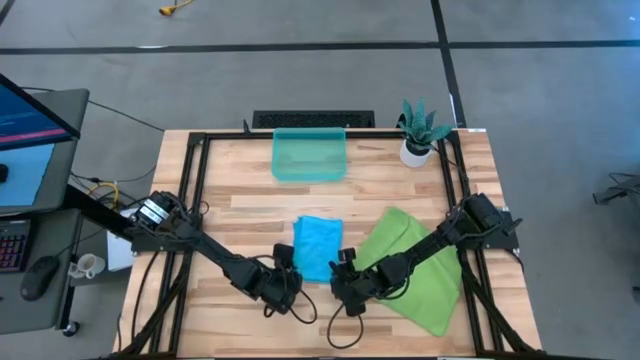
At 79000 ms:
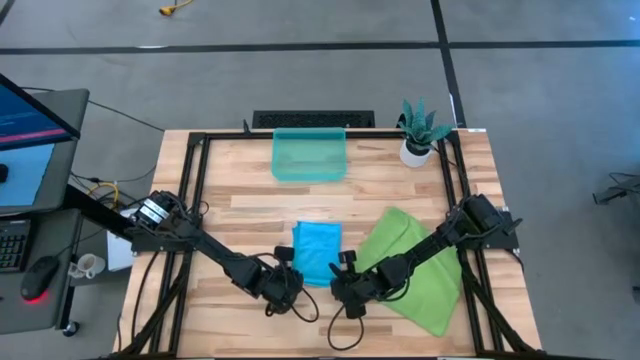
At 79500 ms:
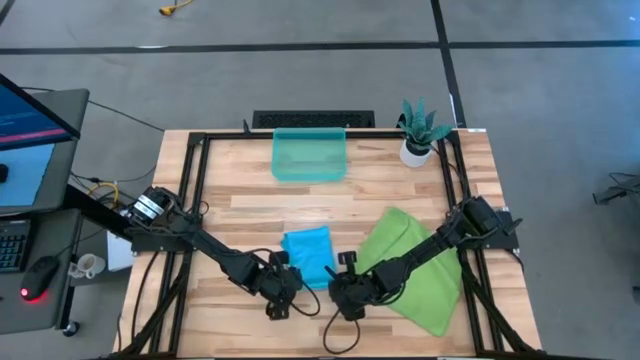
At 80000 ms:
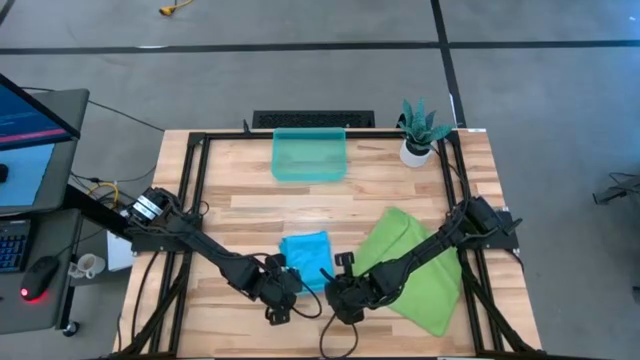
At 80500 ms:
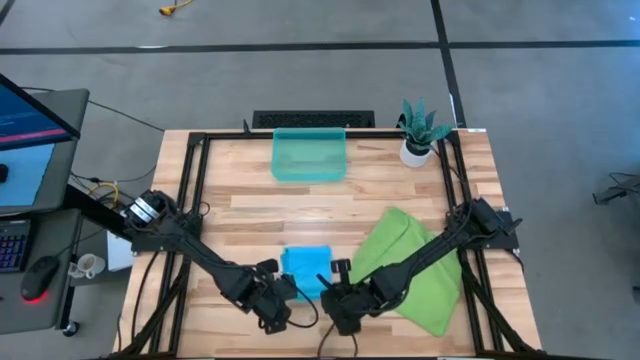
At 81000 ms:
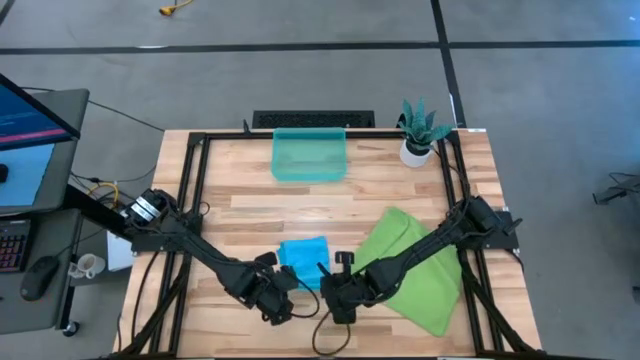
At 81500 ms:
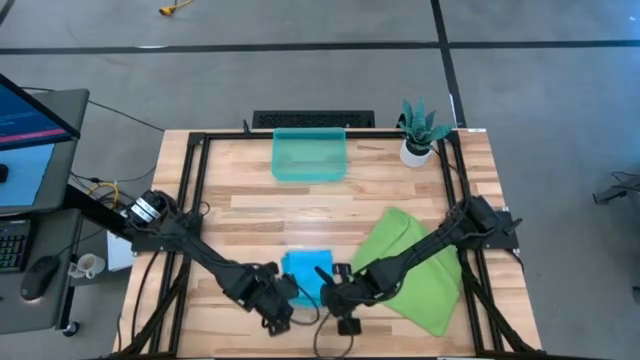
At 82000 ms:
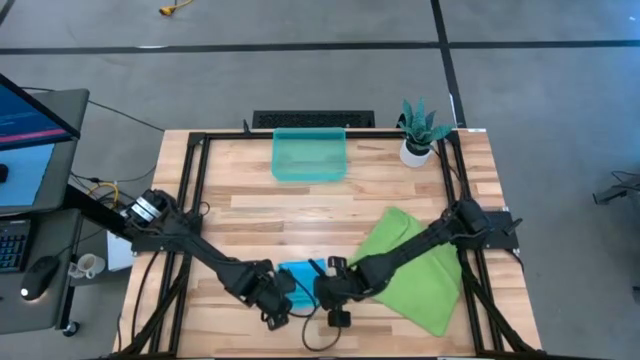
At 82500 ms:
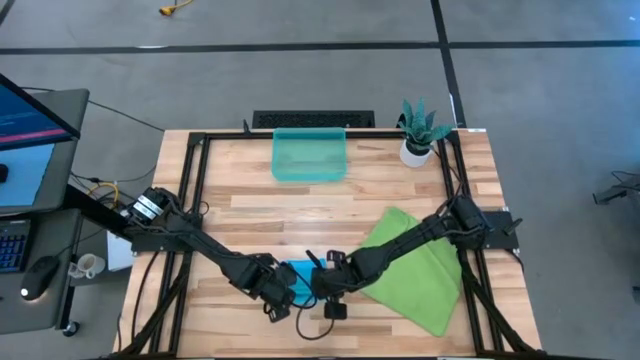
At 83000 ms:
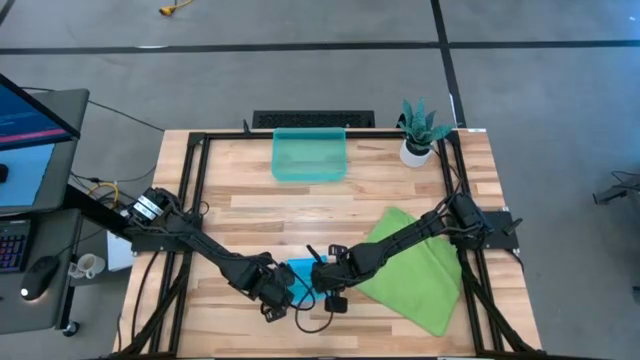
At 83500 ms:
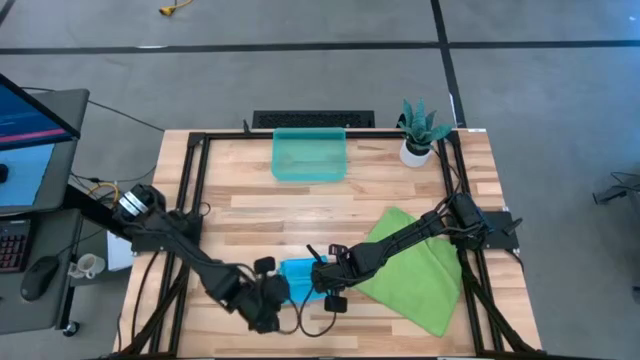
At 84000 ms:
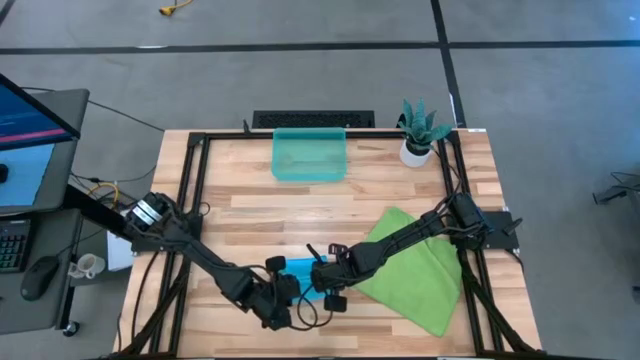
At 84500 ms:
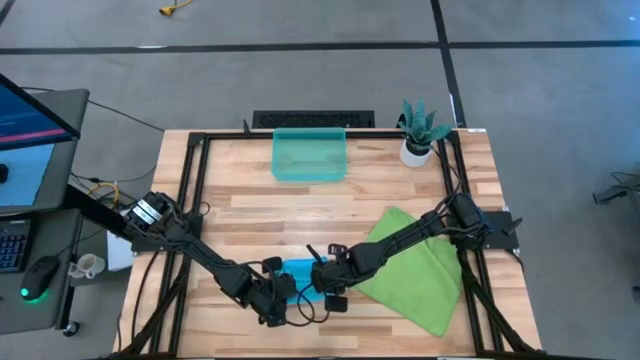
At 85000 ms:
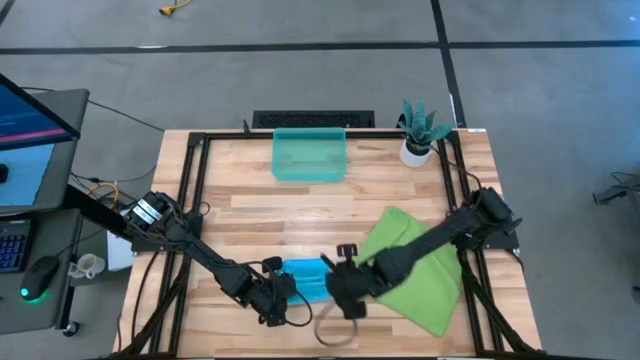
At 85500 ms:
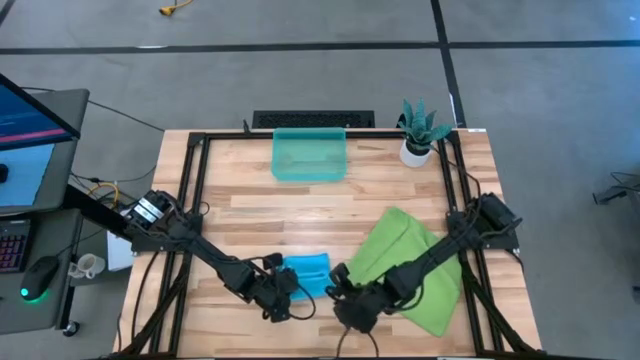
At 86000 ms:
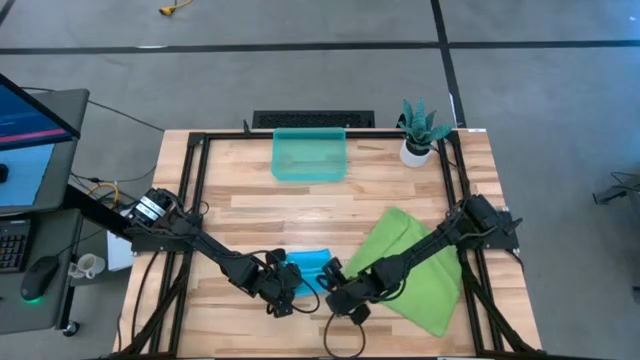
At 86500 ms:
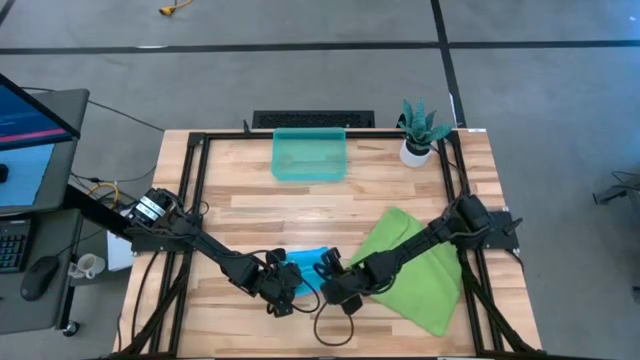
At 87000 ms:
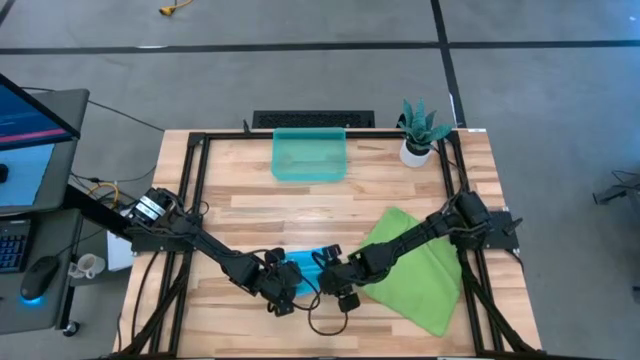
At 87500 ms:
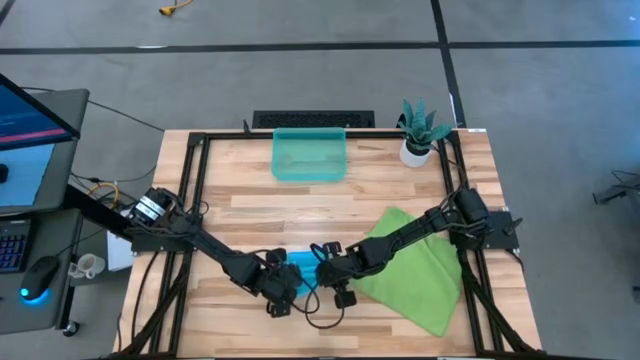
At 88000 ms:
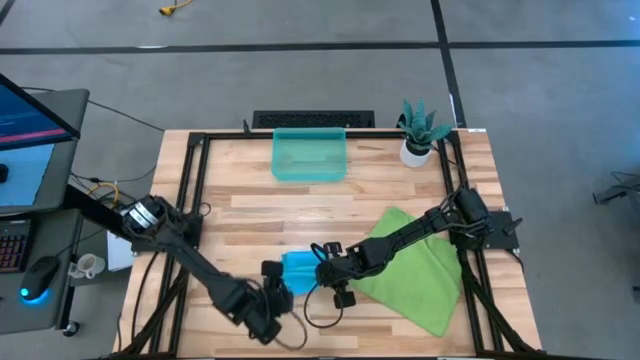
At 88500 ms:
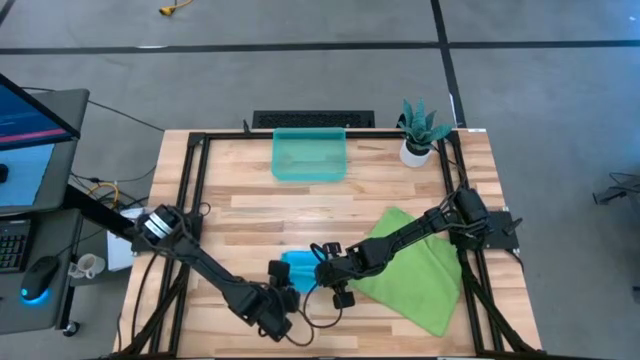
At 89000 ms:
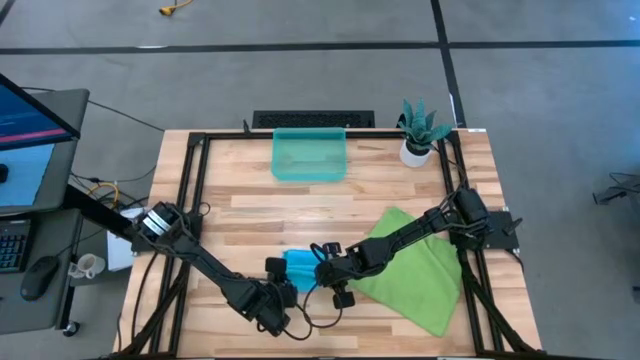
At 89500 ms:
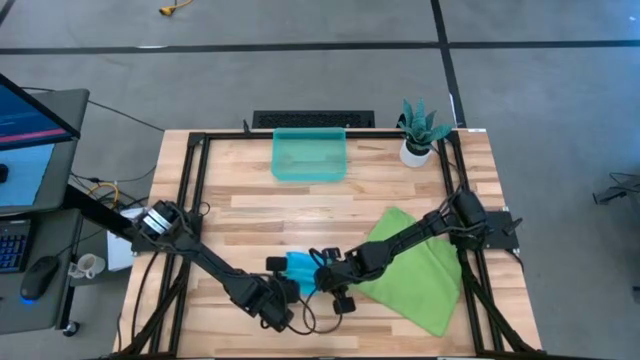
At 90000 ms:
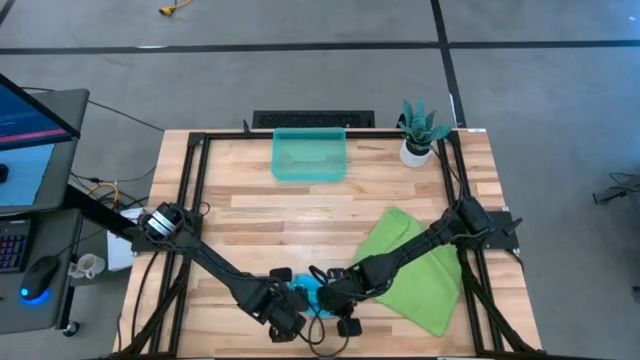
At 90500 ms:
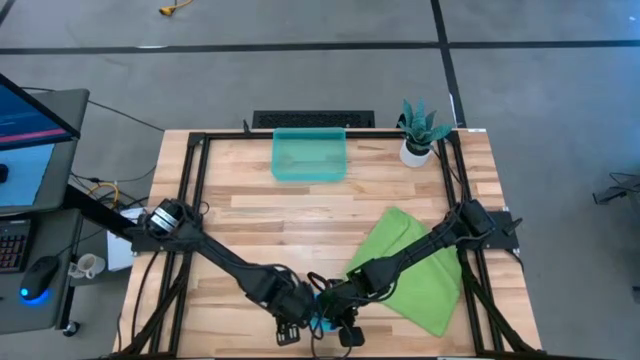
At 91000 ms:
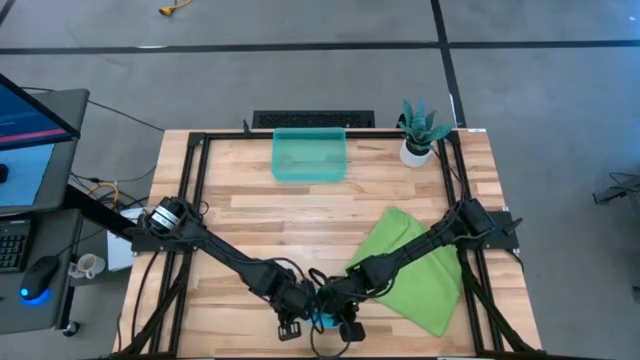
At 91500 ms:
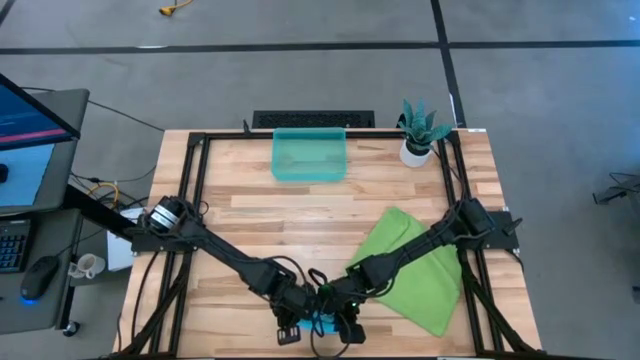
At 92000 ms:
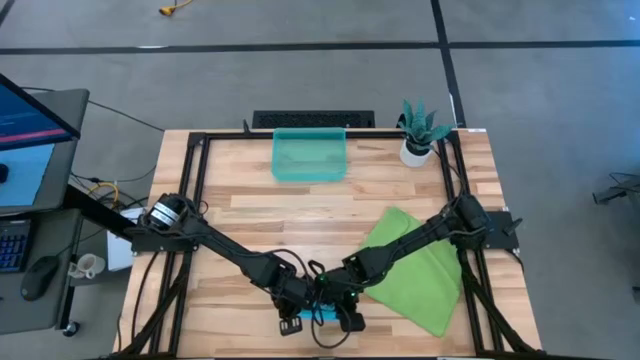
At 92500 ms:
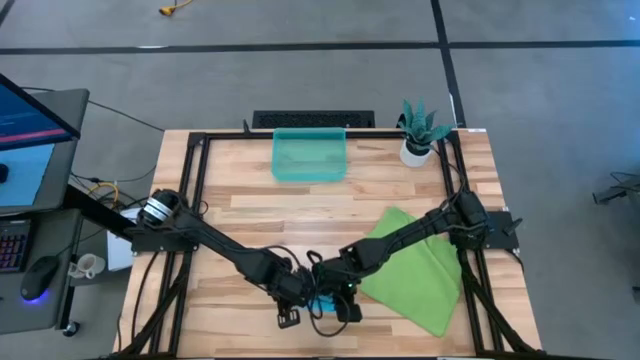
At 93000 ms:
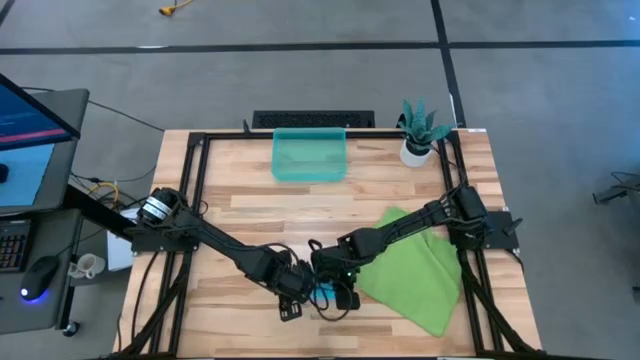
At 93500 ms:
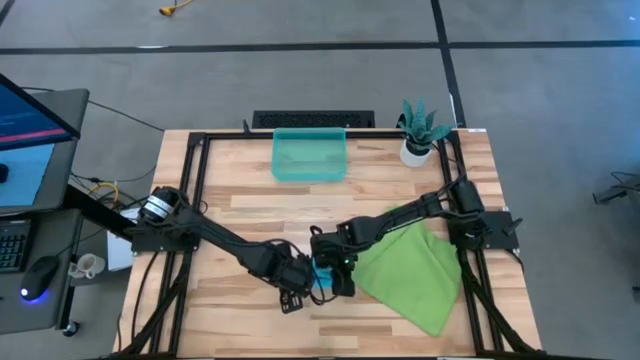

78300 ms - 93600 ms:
Task: Roll microfiber towels into tight, uniform cylinder then place into a basket
Roll the blue microfiber cloth

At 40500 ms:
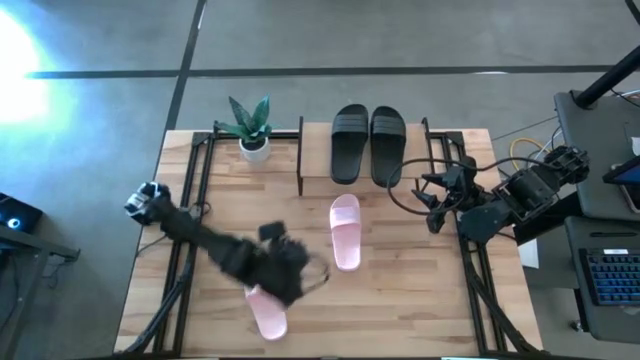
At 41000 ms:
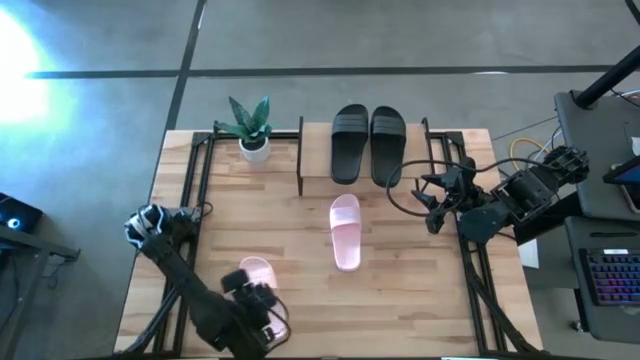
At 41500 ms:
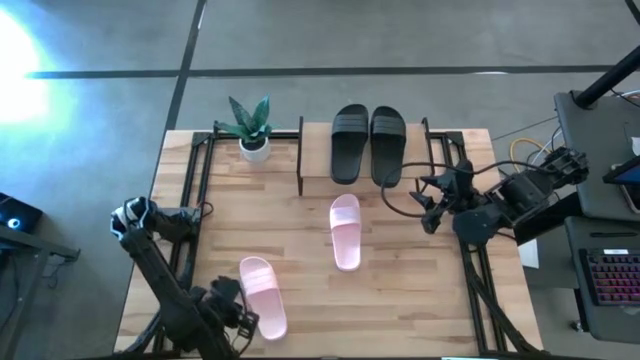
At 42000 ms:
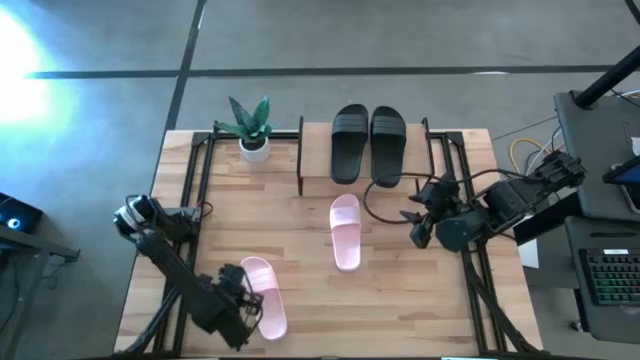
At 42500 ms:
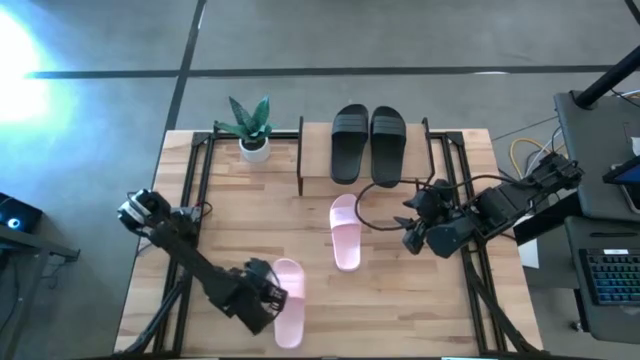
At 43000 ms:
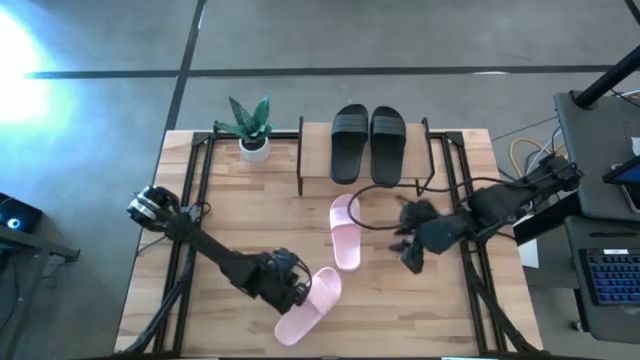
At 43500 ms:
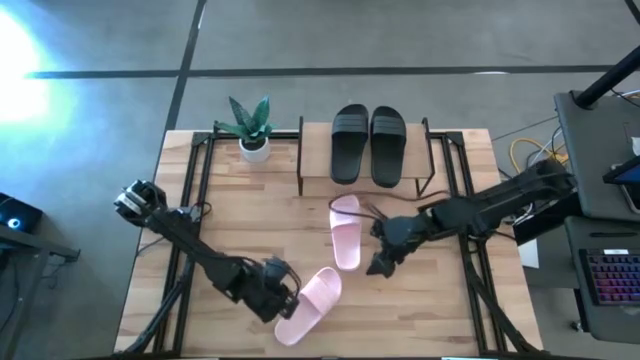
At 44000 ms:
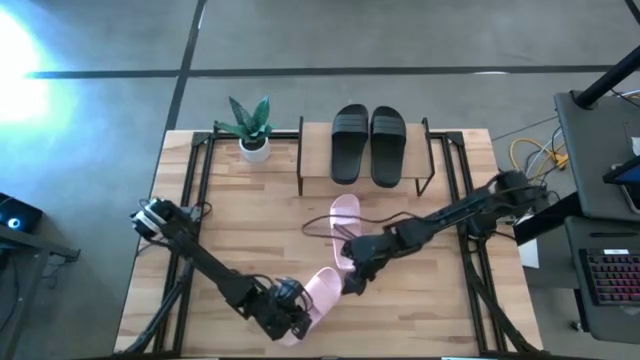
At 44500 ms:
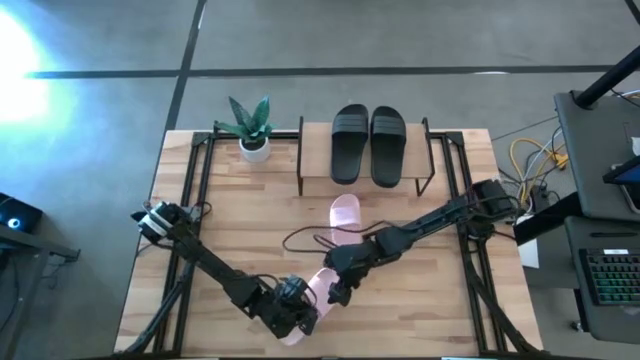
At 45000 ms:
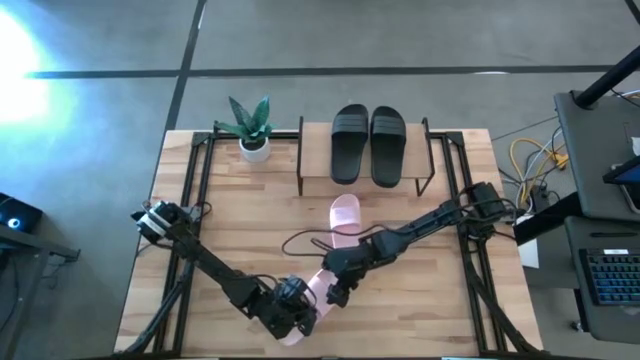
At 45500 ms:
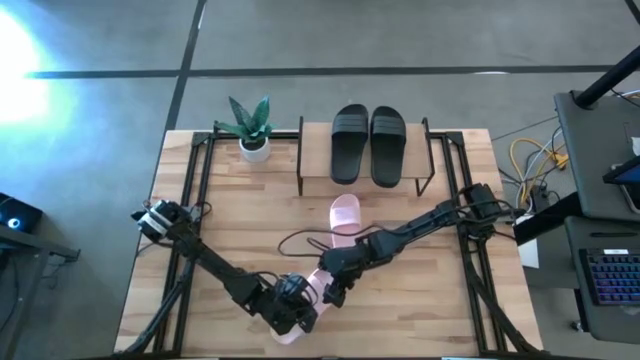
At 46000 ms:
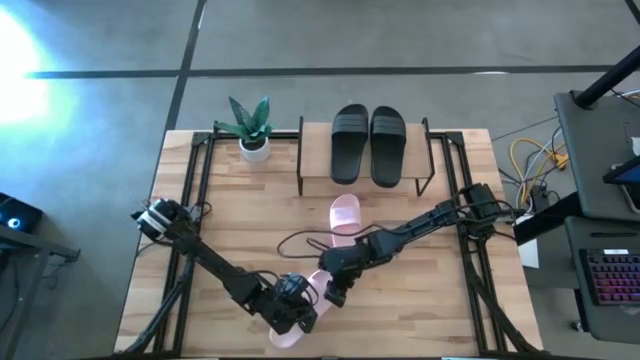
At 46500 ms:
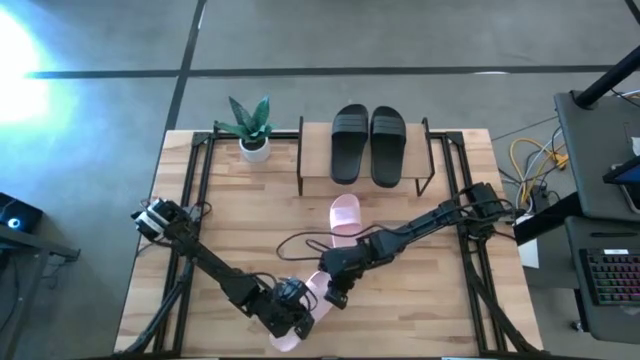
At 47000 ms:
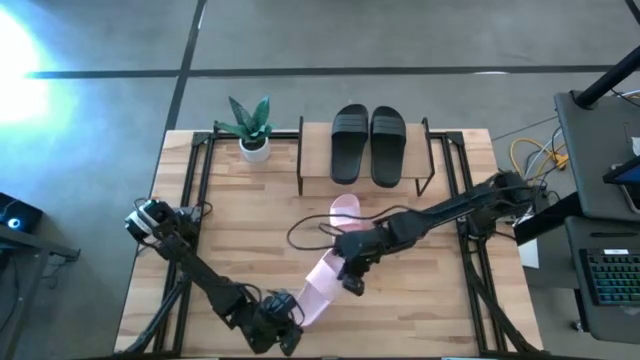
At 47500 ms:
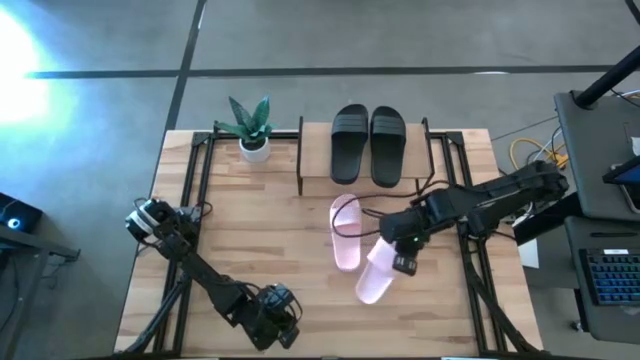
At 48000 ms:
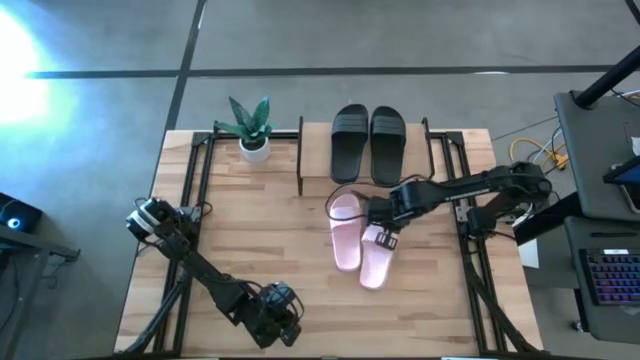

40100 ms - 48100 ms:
Task: Pick and place slides into the shelf
Put the right pink slipper under the shelf
